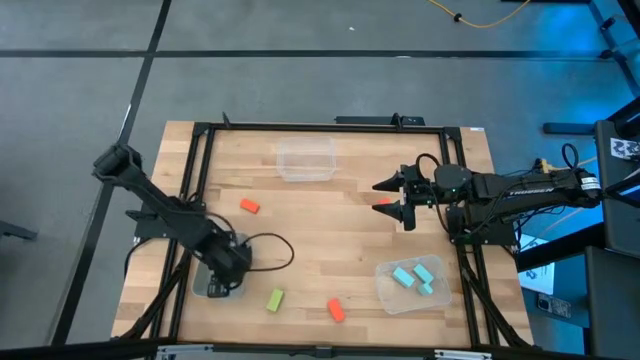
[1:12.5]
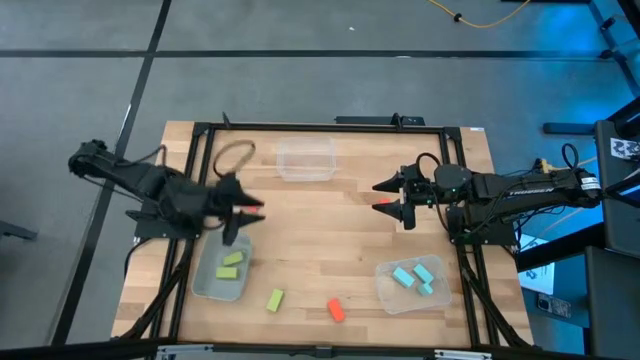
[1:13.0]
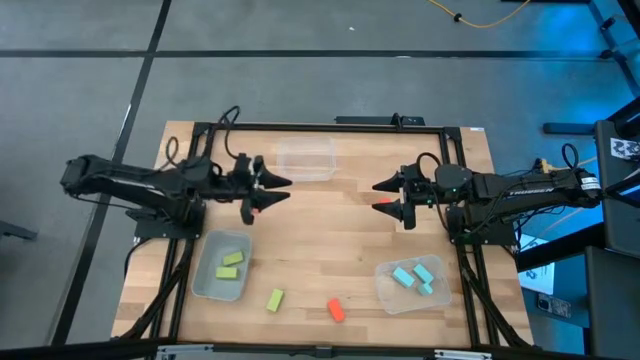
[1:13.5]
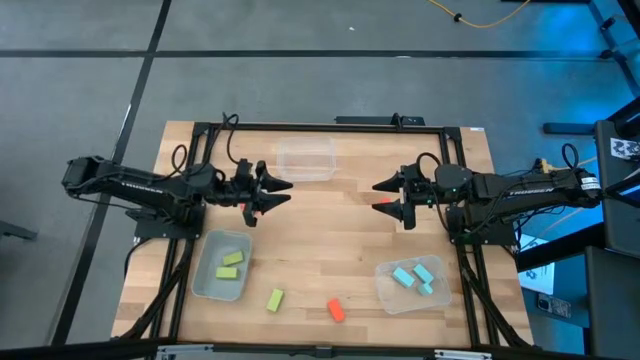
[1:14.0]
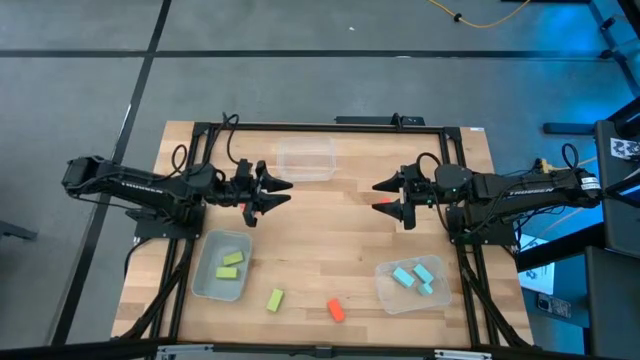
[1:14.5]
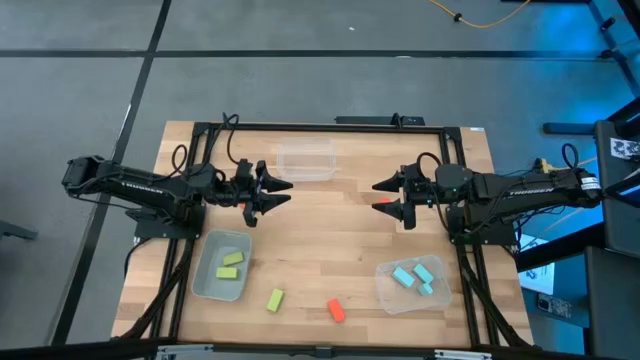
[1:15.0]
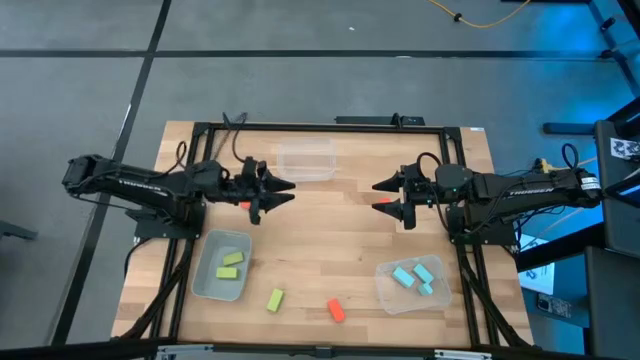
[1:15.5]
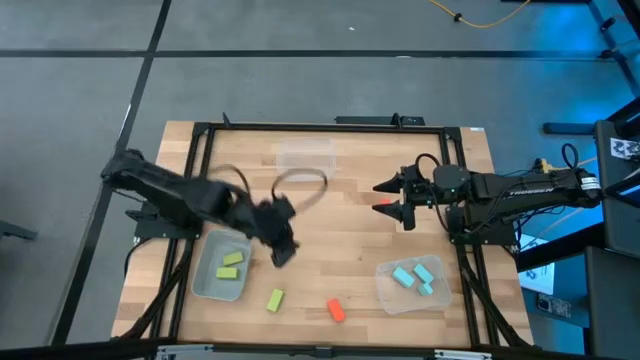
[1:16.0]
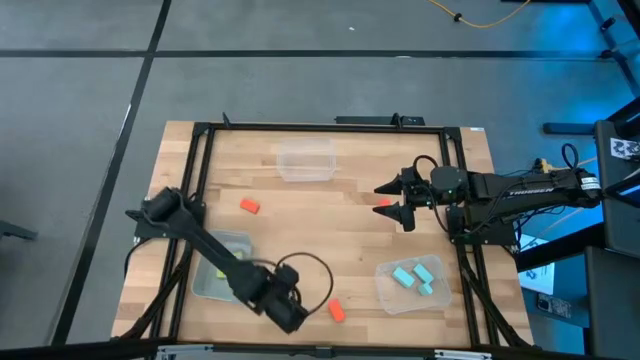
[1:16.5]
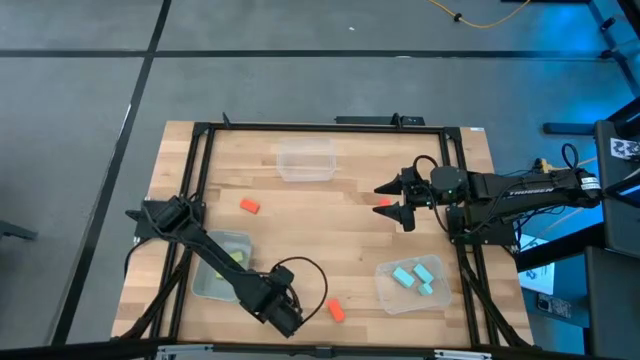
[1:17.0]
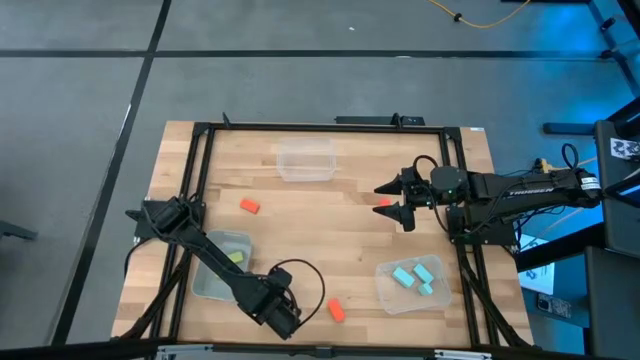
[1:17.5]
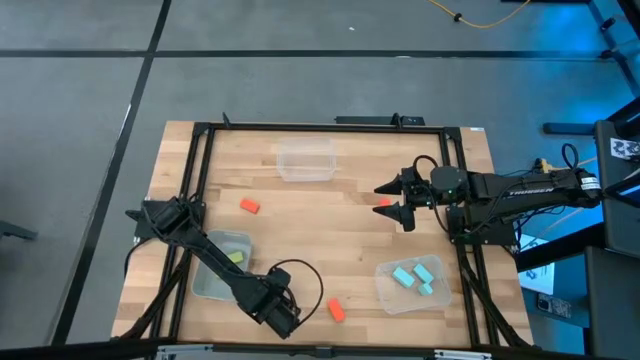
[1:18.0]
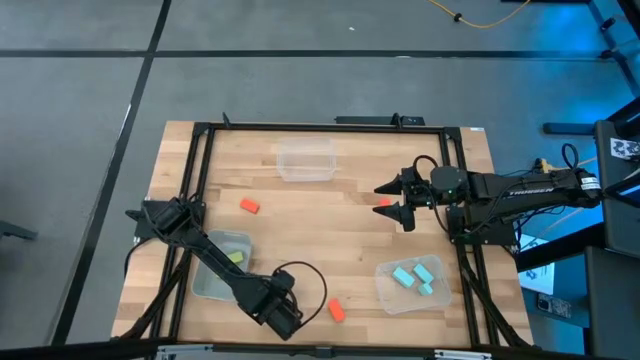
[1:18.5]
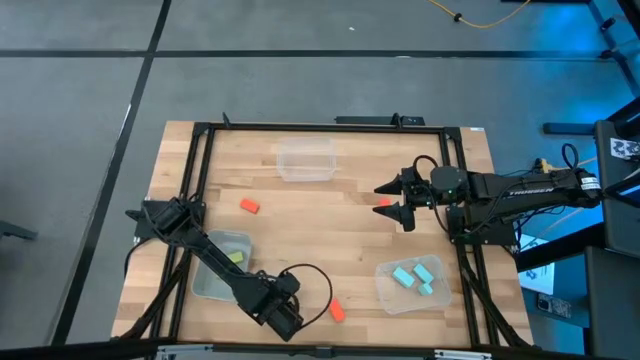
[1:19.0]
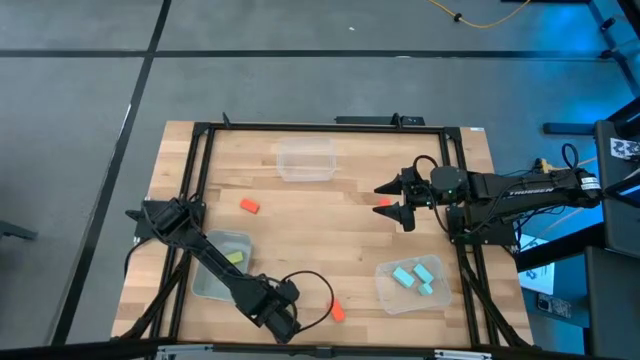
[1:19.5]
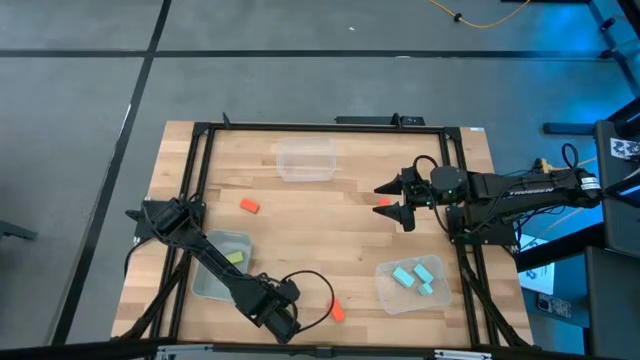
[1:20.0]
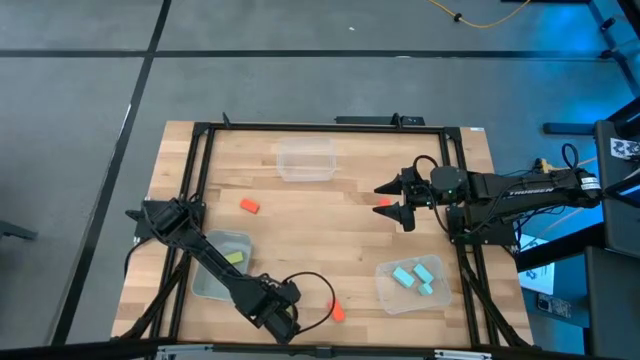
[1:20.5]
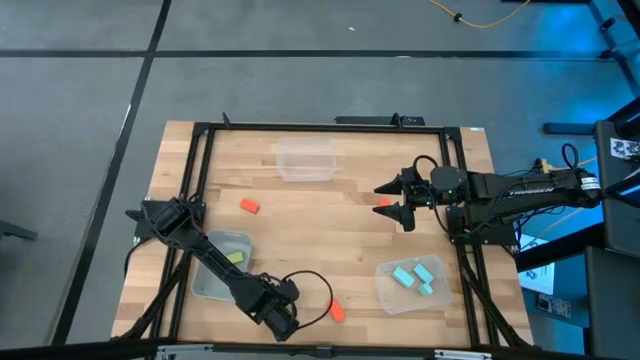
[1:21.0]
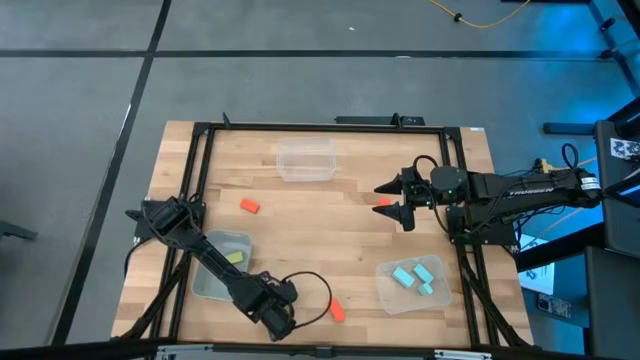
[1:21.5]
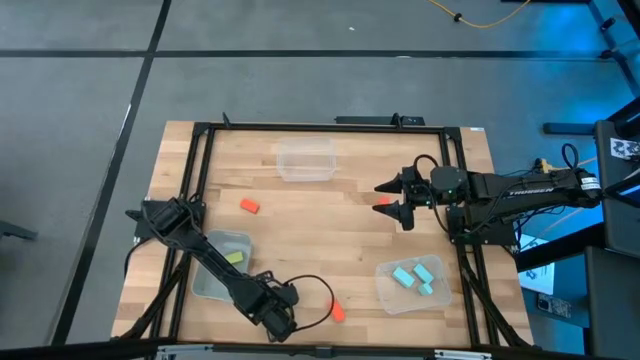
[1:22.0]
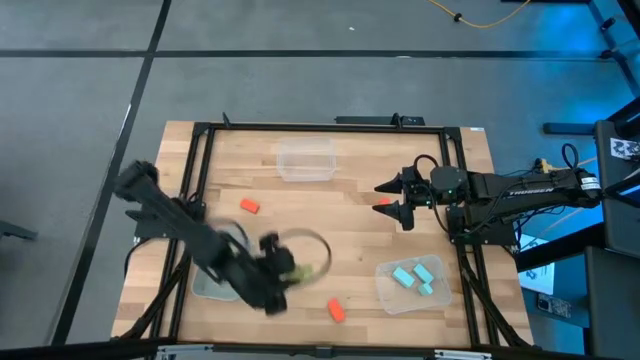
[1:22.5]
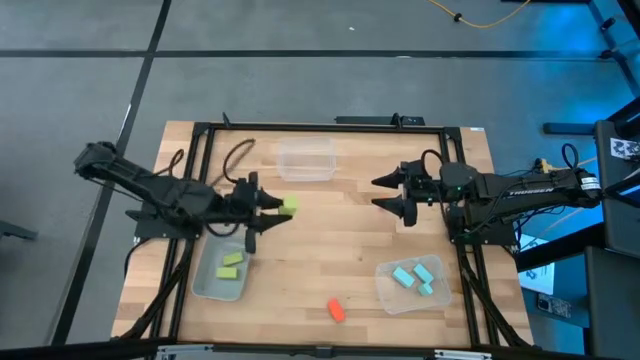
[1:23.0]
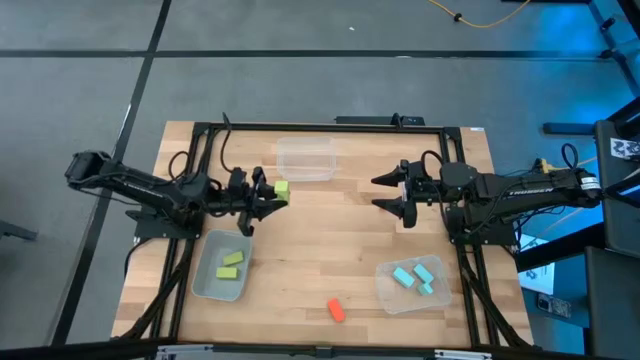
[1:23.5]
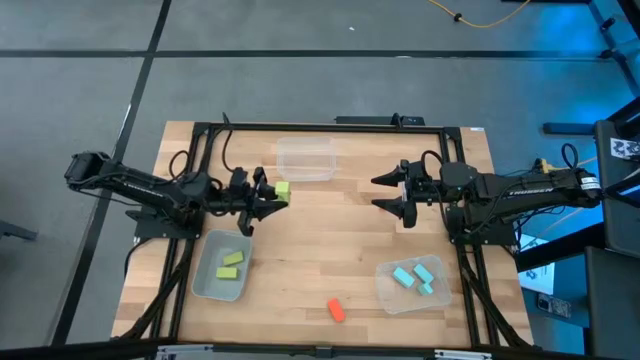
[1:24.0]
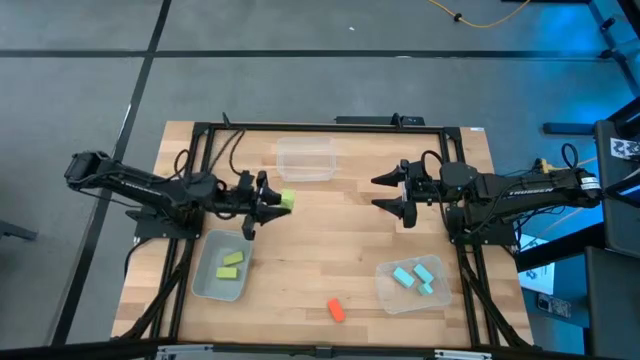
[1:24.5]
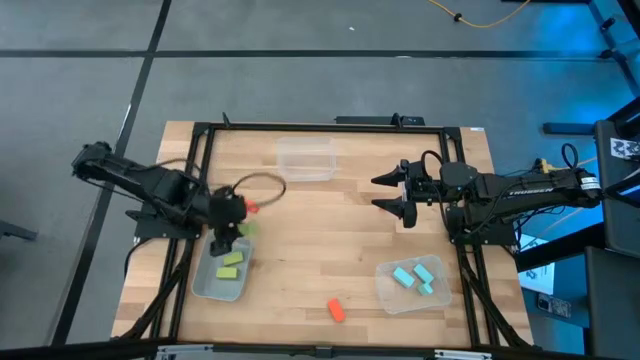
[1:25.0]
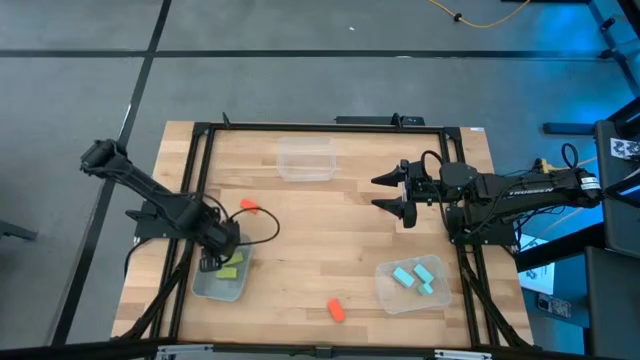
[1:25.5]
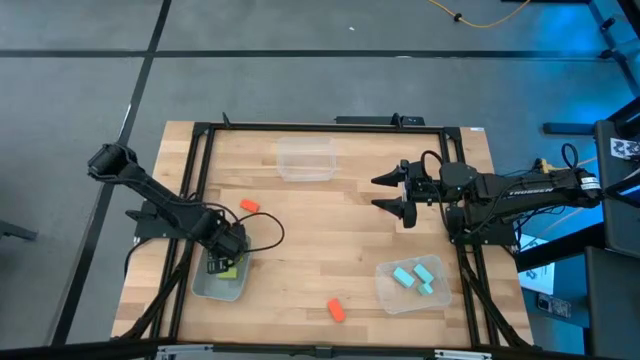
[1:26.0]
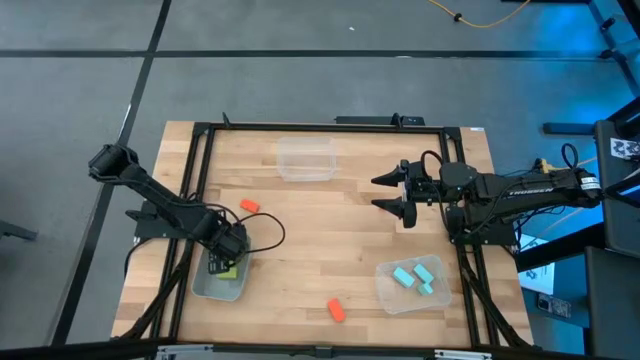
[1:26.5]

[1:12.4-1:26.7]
Task: Sort & place blocks by color
Put the lime green arch block into the gray bin

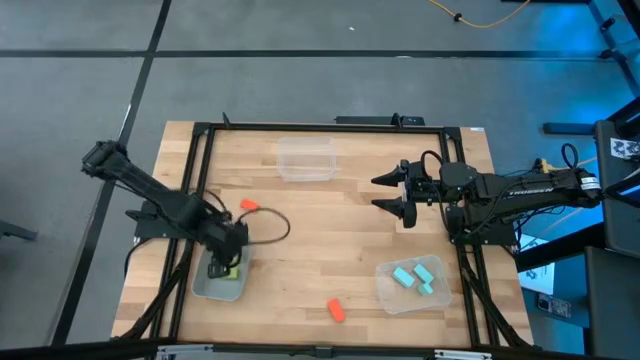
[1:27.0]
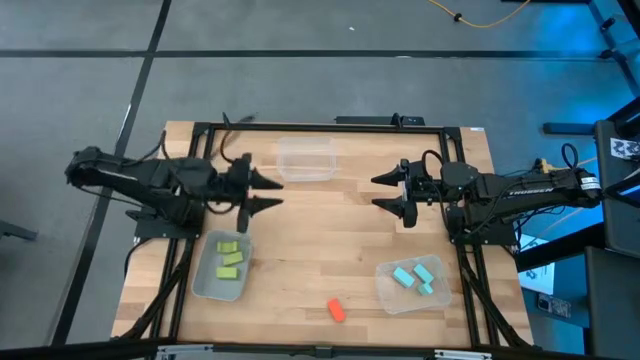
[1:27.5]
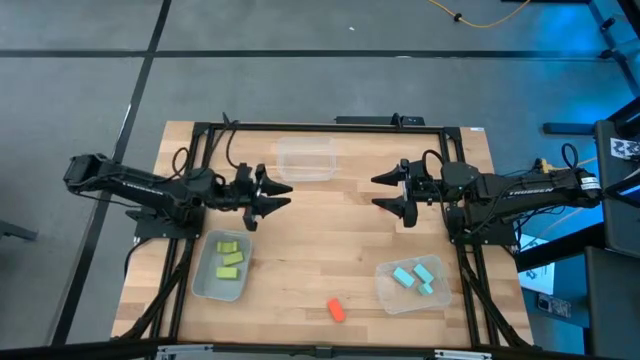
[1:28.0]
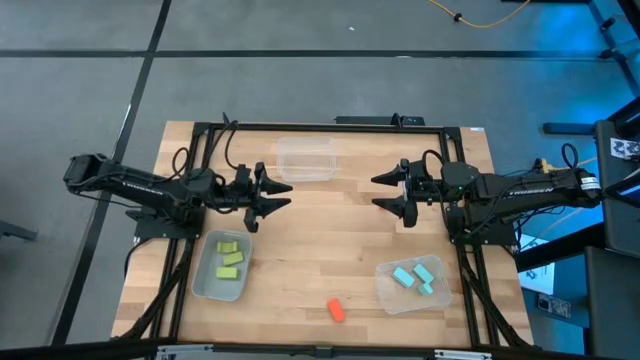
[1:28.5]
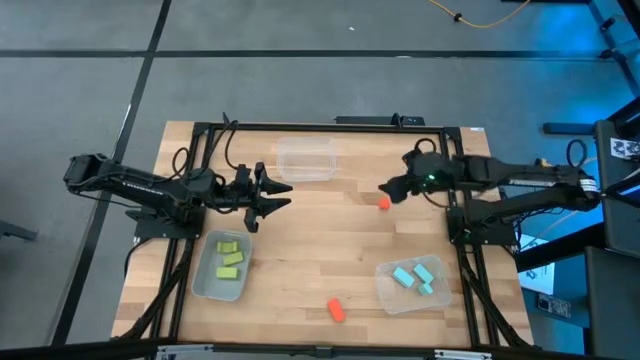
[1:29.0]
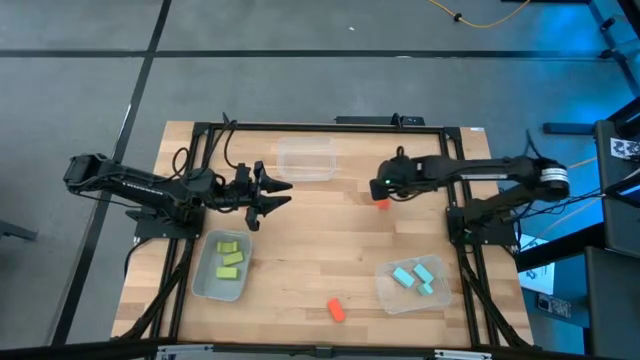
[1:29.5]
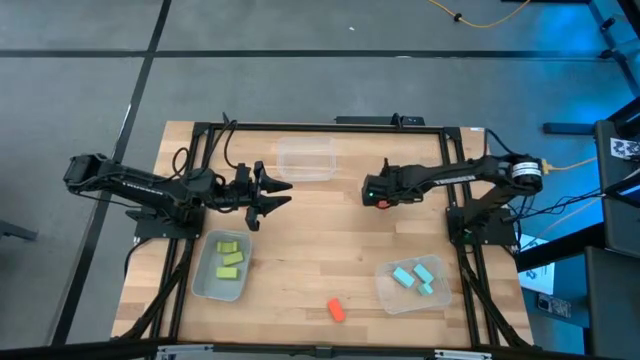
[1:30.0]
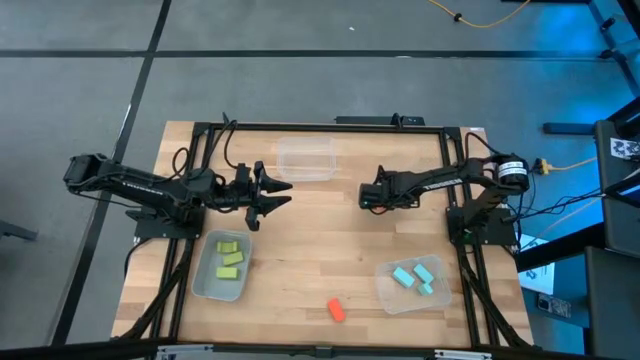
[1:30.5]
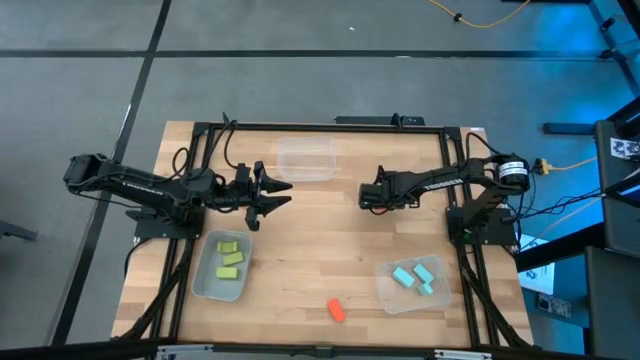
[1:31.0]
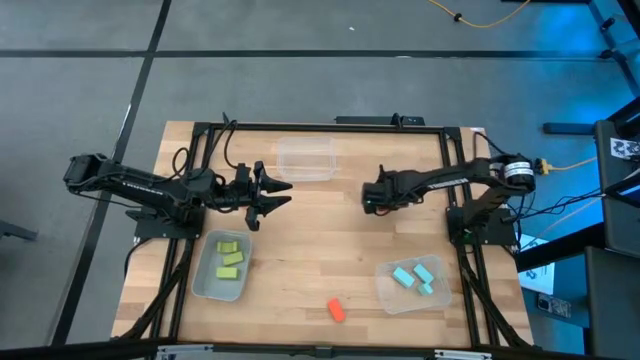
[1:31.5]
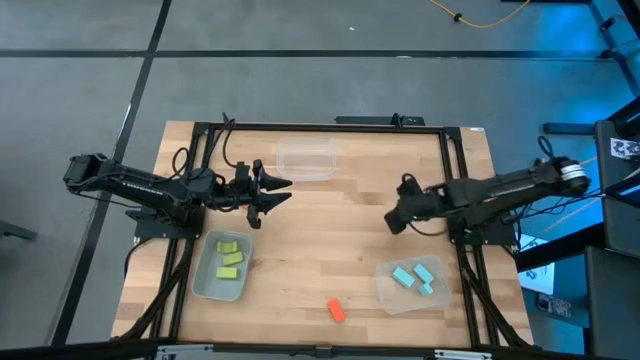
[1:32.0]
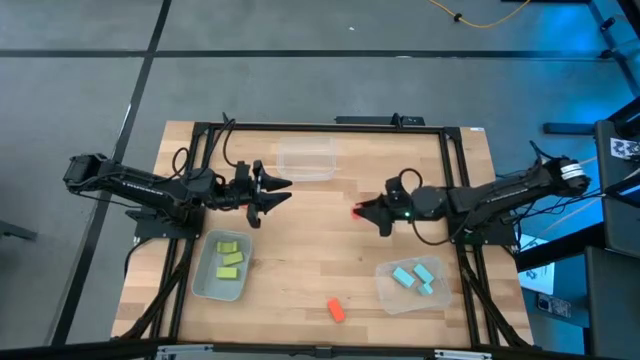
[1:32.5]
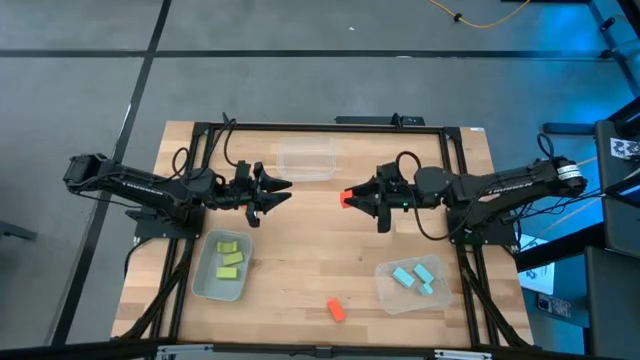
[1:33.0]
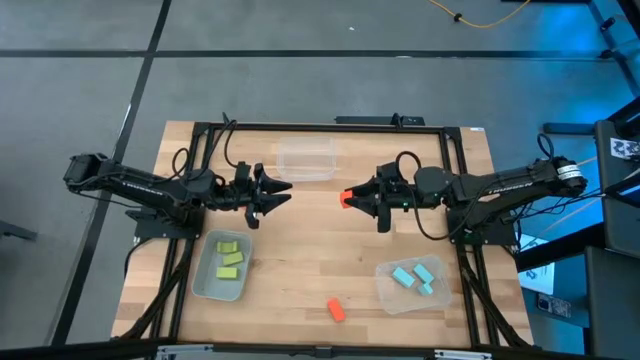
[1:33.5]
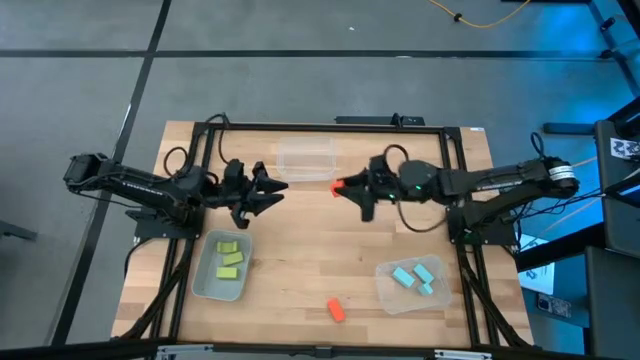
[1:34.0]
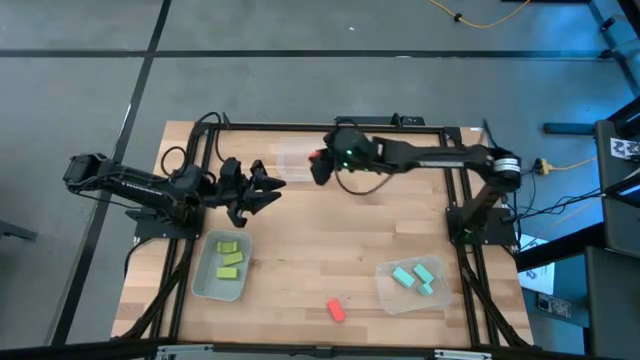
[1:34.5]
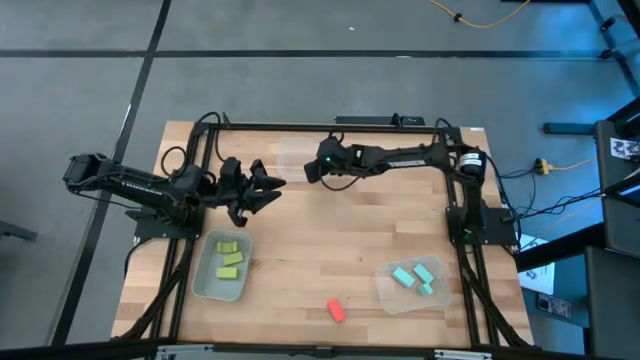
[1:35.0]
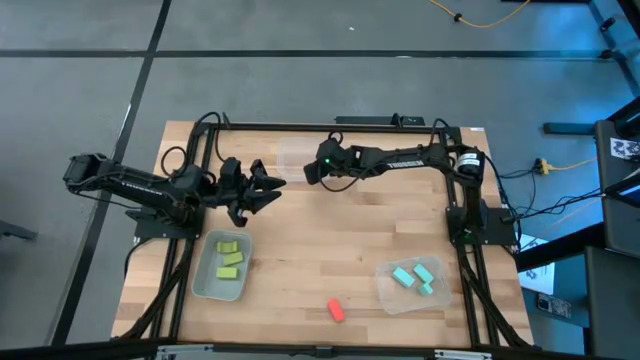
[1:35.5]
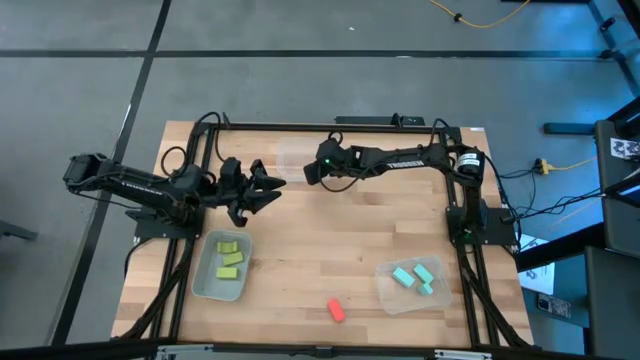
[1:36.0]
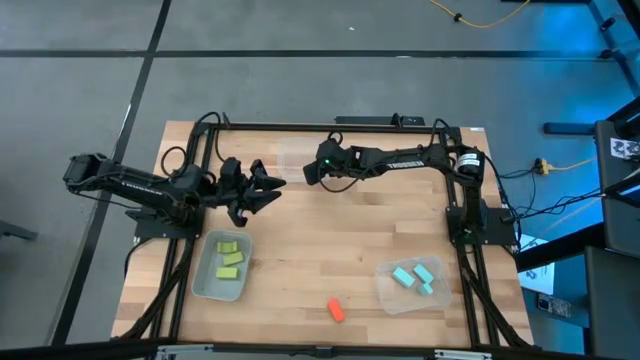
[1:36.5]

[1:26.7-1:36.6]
Put the top right orange square block into the top transparent bin
